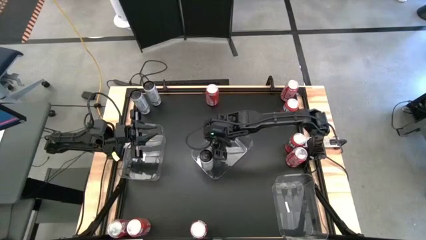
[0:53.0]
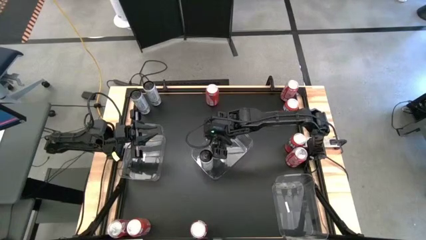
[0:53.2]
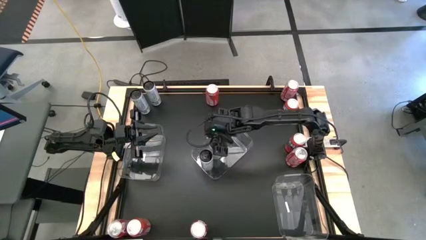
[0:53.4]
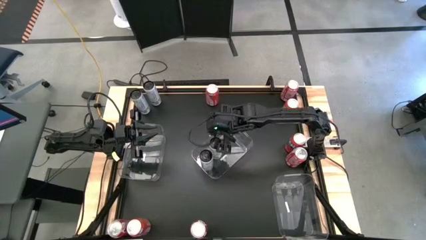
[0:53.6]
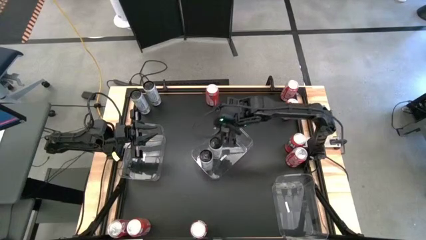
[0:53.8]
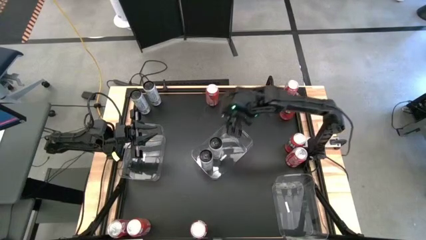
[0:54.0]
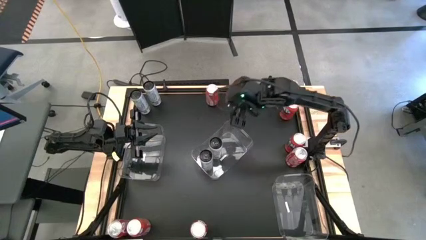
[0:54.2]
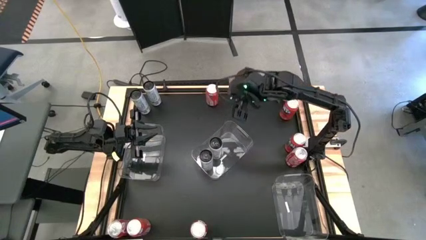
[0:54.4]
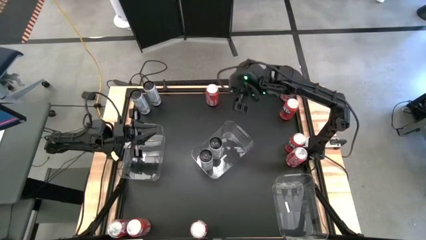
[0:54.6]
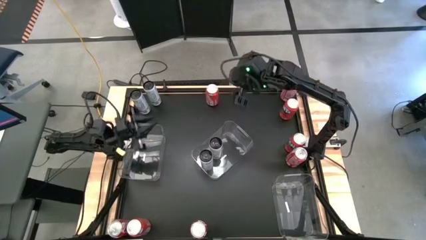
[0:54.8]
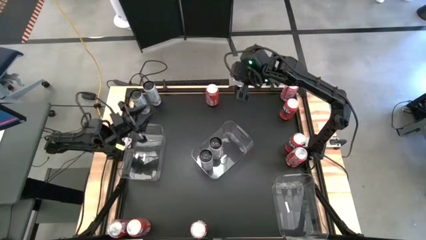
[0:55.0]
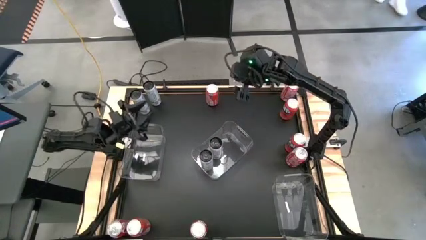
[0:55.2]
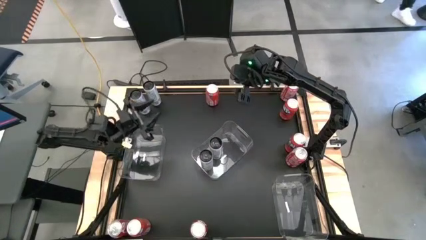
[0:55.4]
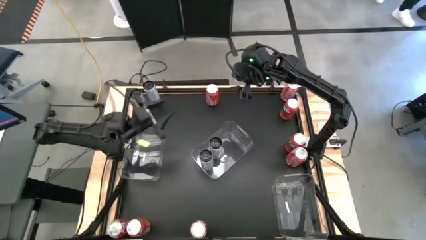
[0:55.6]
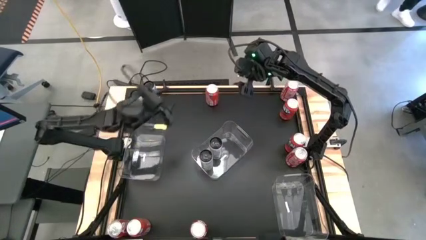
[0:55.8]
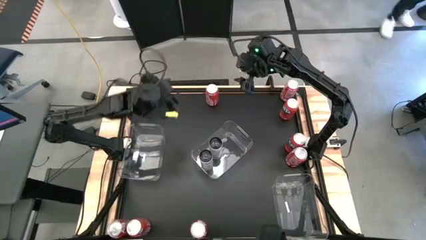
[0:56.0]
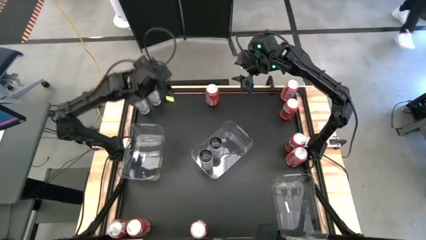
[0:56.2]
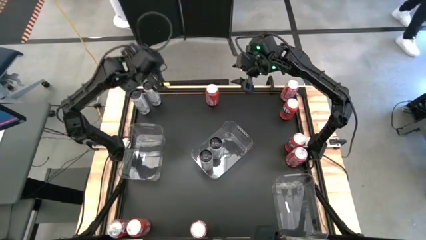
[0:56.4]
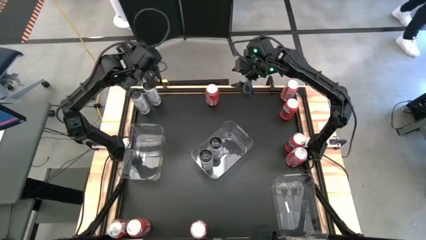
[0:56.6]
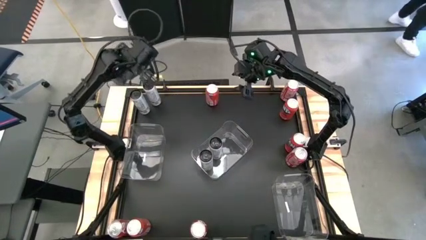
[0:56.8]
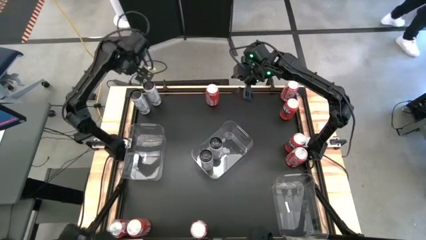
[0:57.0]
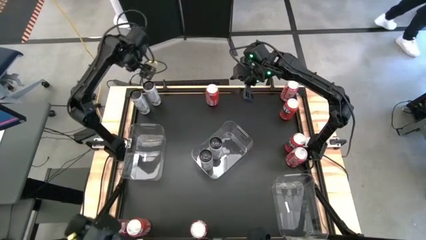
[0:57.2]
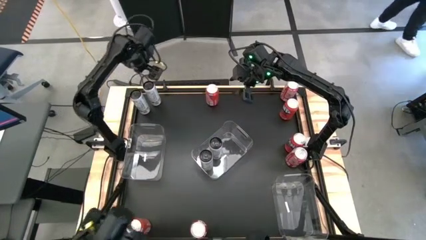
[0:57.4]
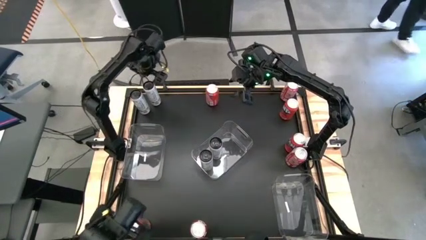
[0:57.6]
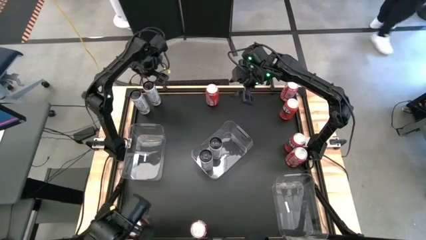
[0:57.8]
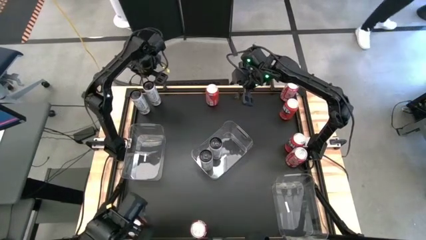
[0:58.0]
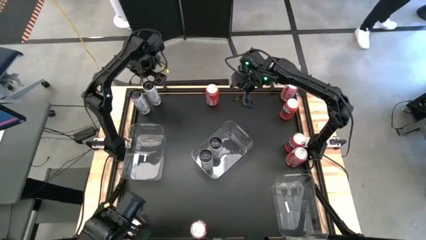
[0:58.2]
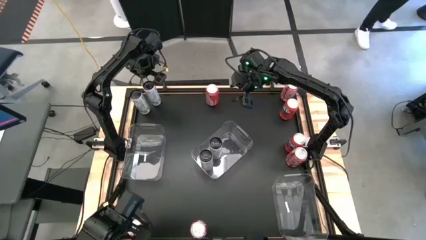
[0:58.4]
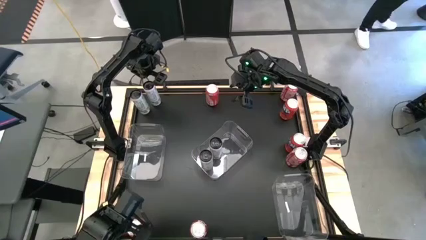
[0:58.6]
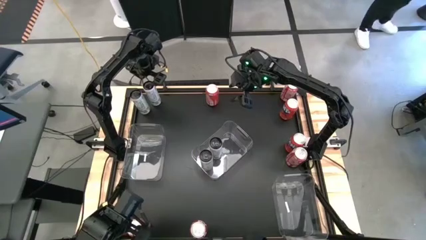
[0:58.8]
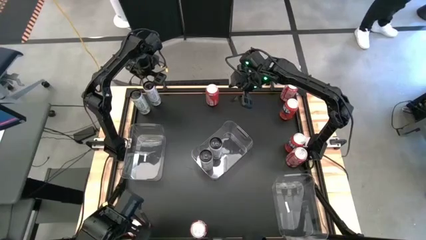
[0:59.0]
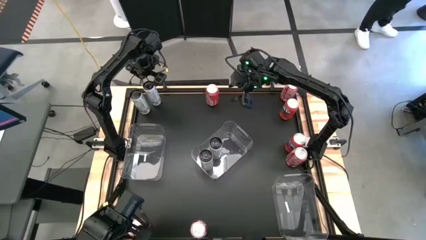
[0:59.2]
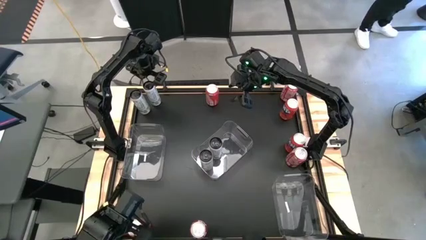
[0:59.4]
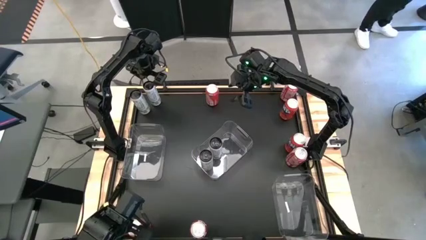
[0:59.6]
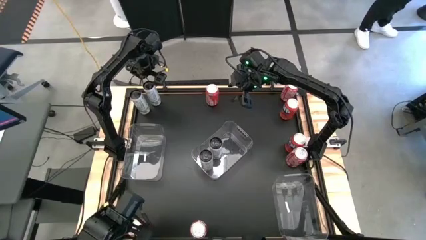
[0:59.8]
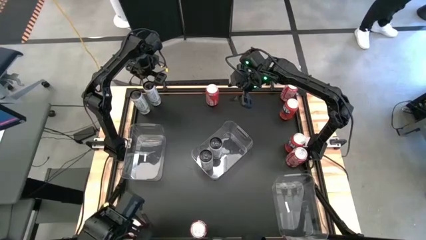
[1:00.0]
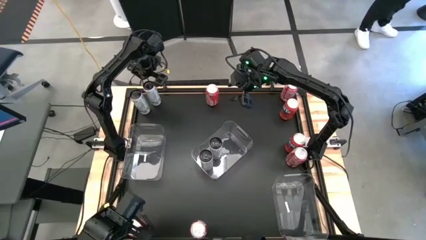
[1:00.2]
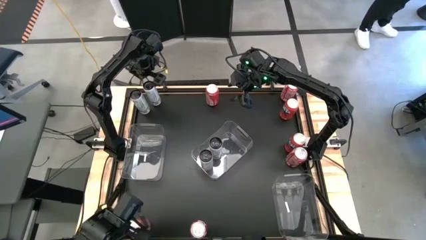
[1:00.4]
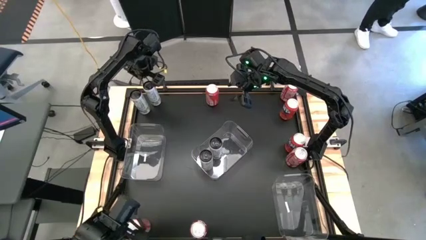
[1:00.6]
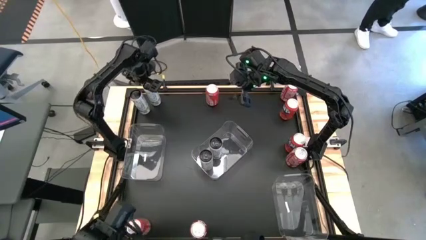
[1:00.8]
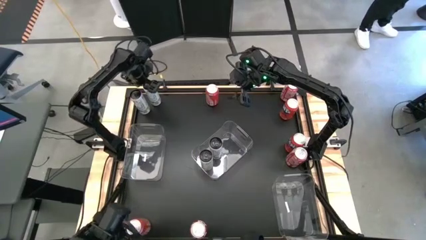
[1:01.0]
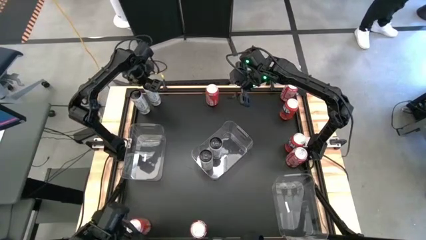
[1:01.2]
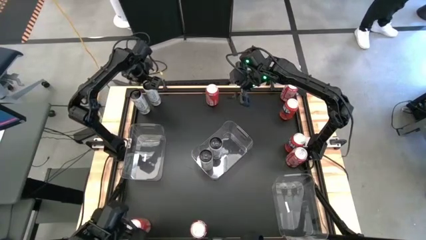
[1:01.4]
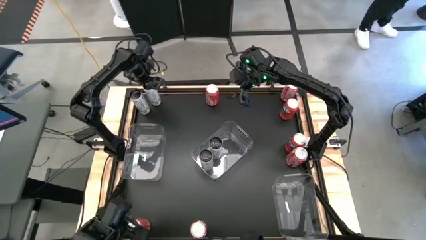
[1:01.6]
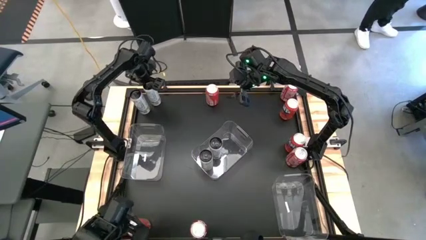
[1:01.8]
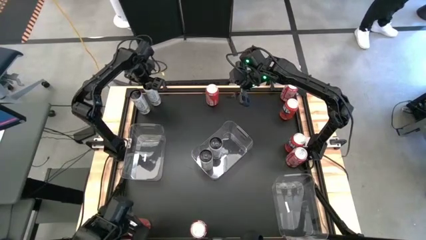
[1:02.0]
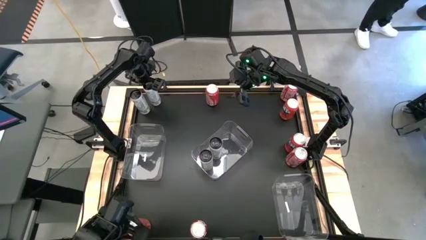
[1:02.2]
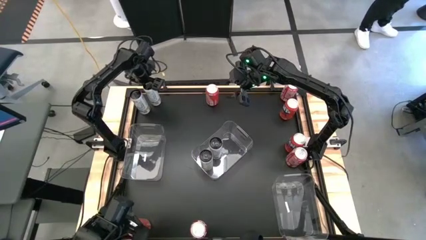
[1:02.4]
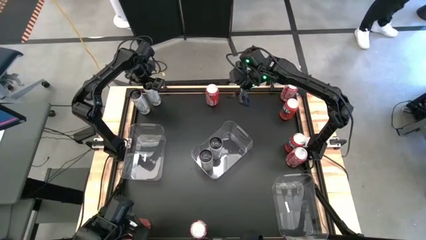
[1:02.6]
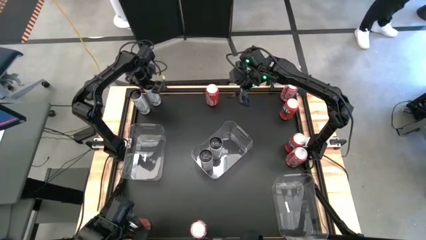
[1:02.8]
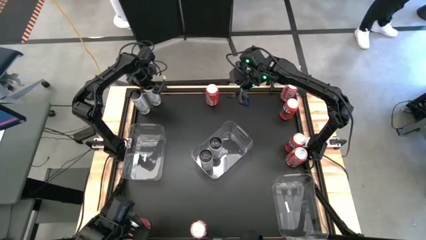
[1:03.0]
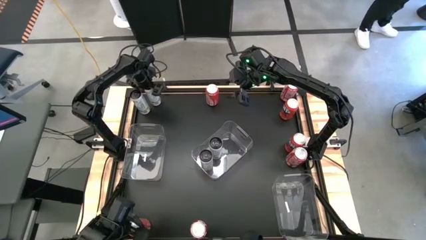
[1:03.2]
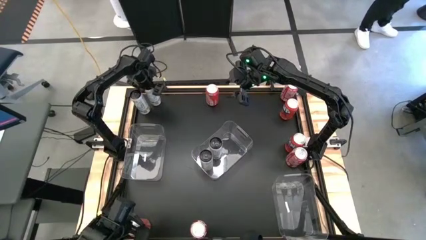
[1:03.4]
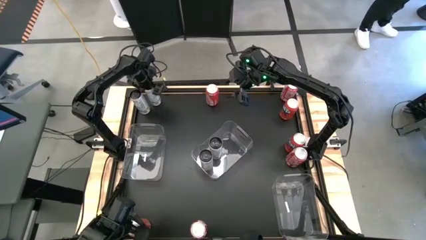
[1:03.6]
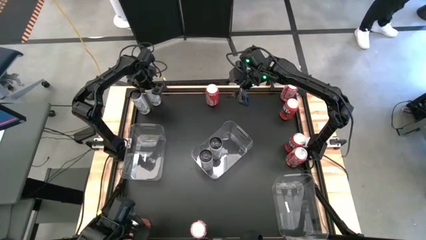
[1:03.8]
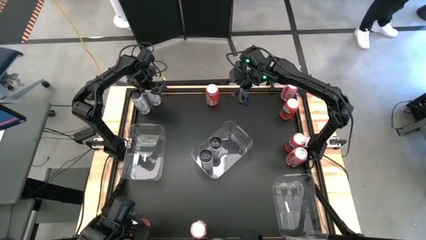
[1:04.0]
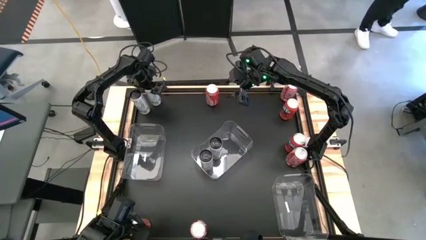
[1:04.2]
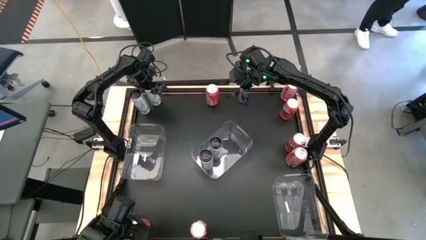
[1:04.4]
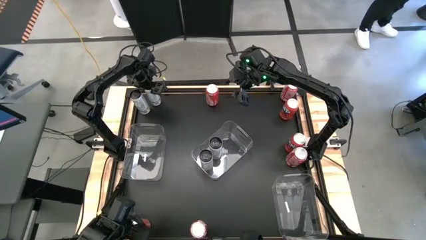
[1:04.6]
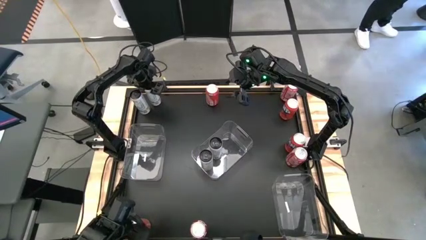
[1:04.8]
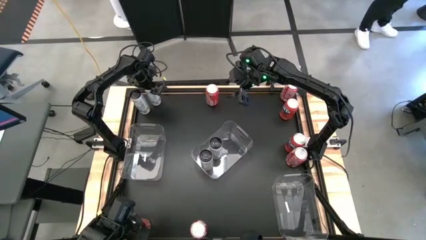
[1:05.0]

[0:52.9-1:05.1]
Task: Sort soda cans
Put the white soda can into the middle transparent bin

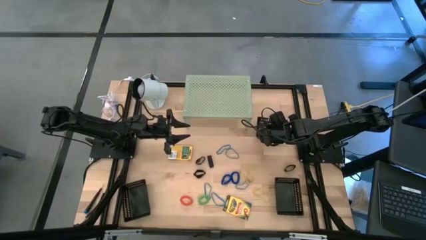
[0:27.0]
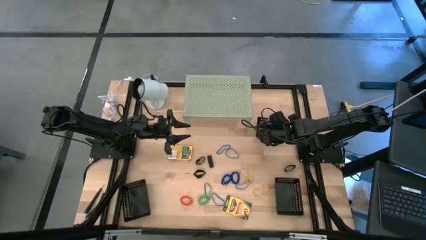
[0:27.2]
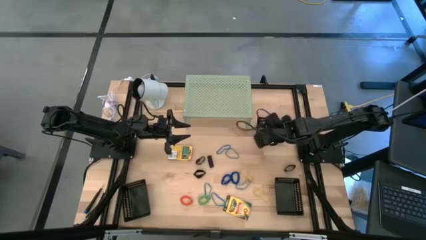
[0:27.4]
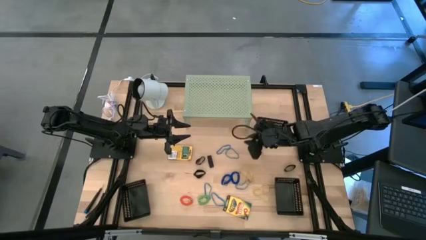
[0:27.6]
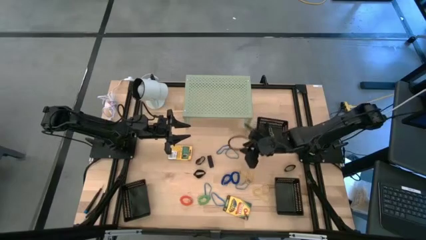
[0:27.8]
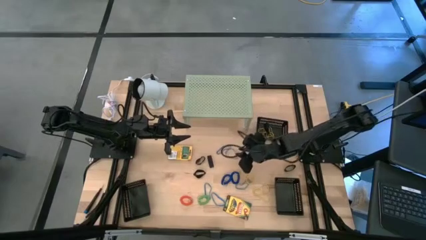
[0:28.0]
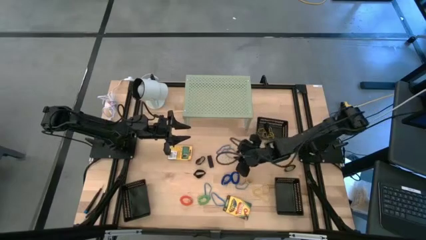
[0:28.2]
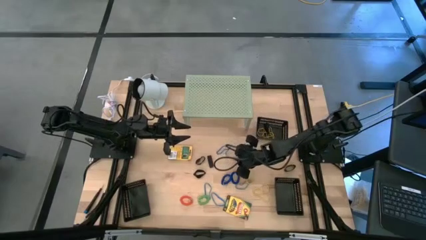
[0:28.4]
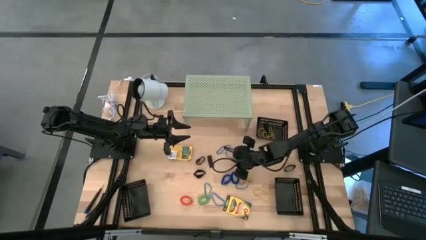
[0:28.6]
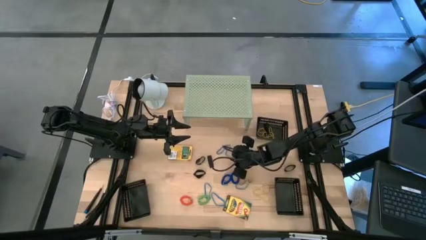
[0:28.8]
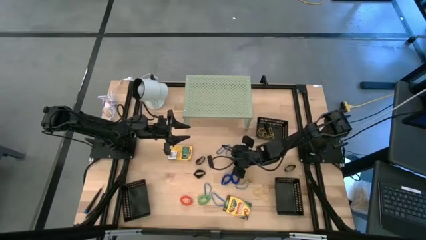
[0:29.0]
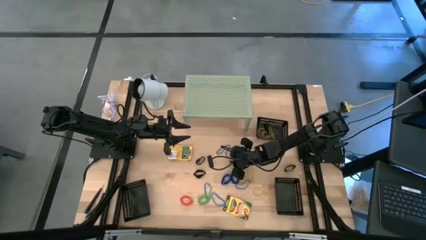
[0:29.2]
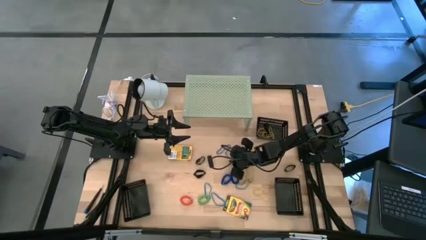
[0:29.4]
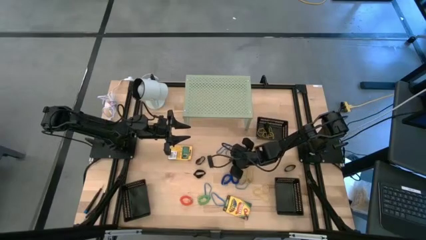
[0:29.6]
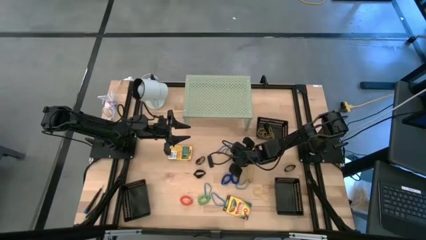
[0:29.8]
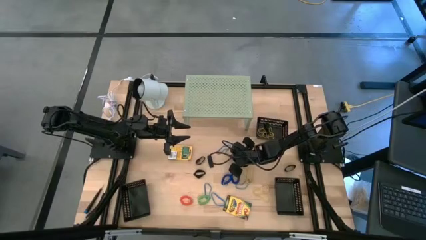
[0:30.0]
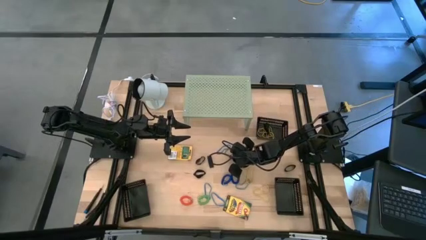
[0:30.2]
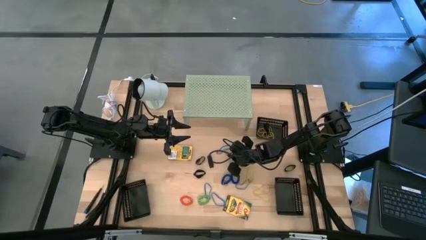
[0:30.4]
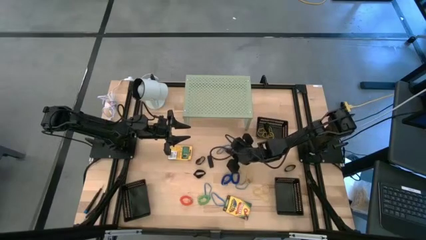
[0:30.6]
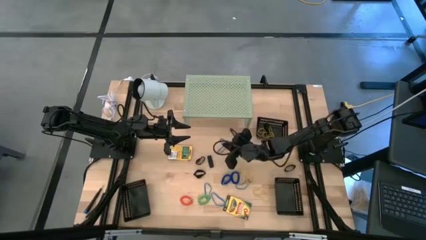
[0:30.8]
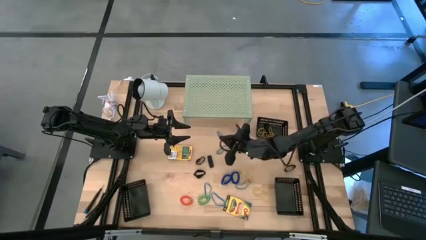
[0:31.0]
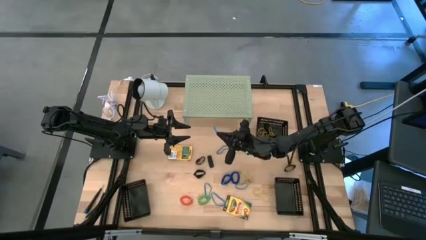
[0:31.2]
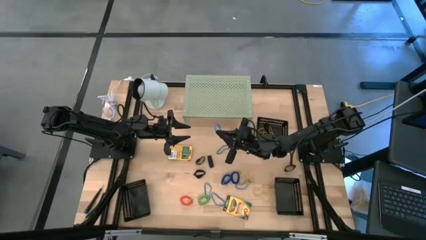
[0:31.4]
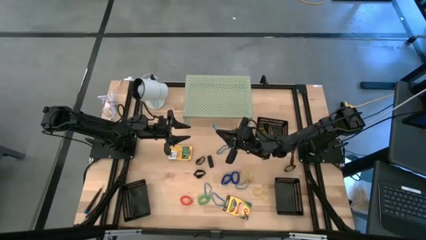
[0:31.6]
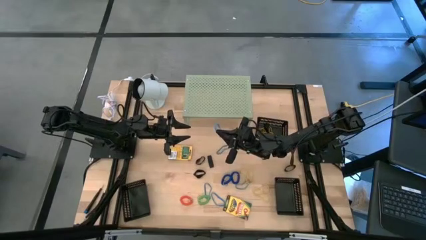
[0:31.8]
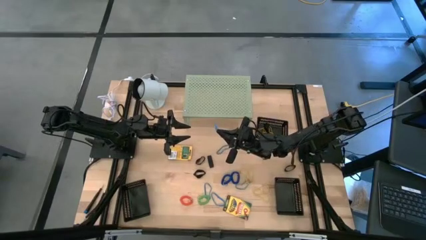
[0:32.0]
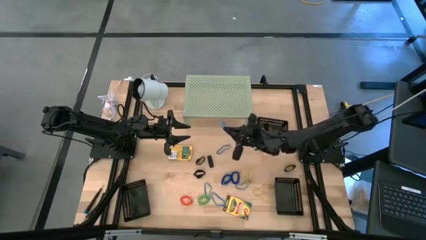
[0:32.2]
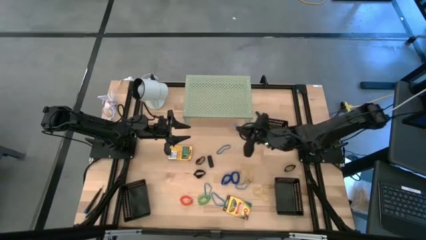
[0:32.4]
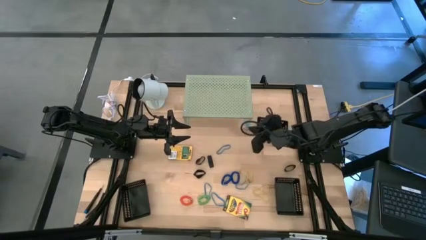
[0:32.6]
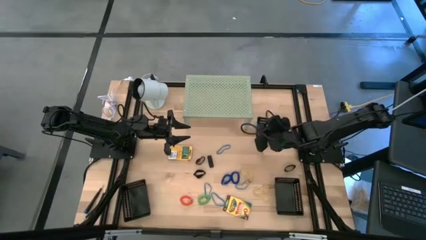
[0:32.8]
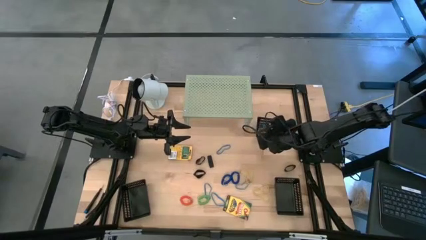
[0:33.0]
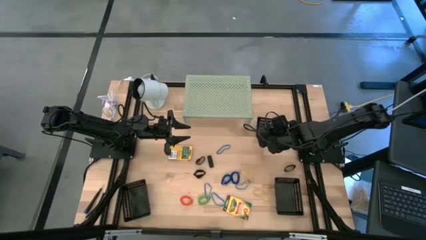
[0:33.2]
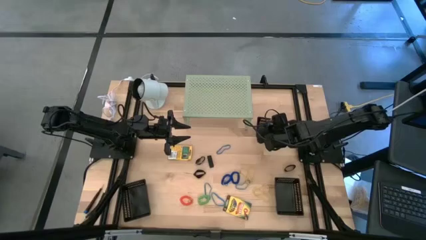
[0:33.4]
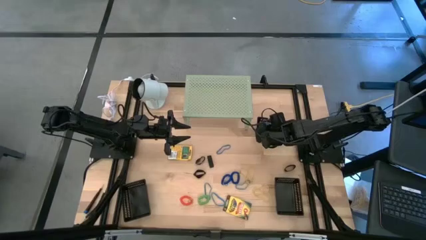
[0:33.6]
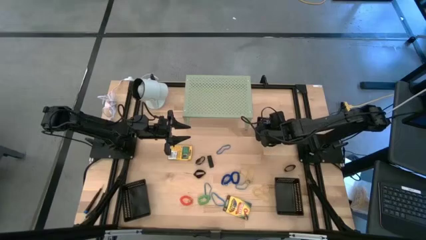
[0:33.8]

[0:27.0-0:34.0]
Task: Pick & Place Office Desk Supplies
Put the blue rubber band into the top right black bin
